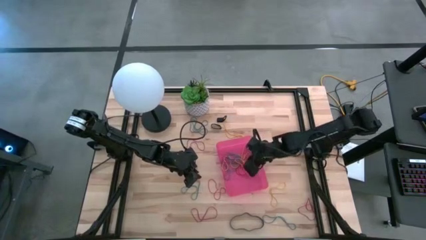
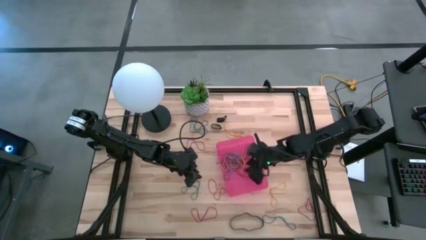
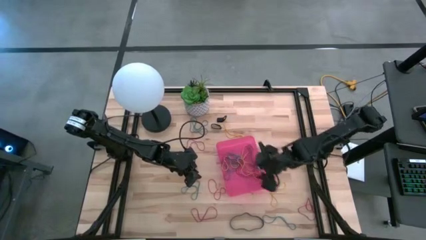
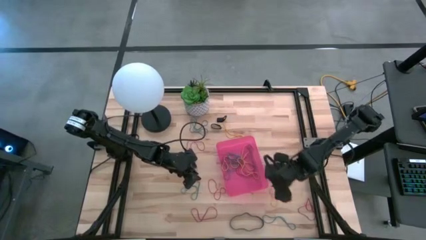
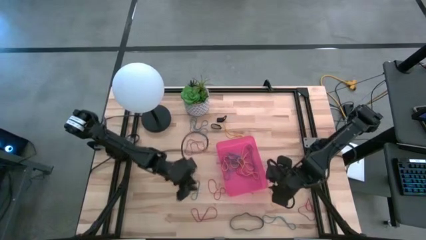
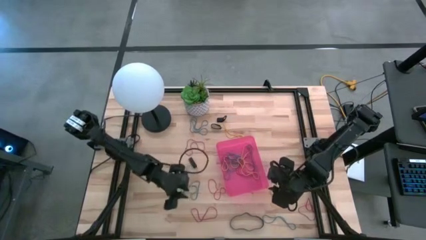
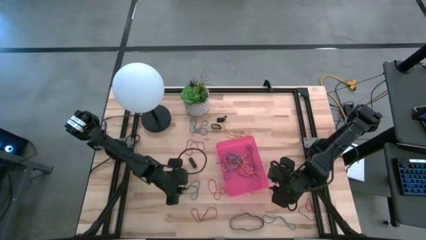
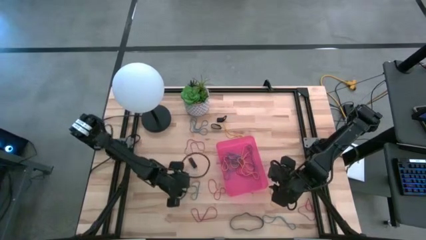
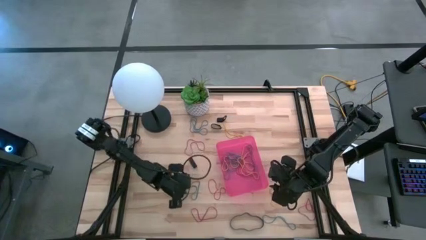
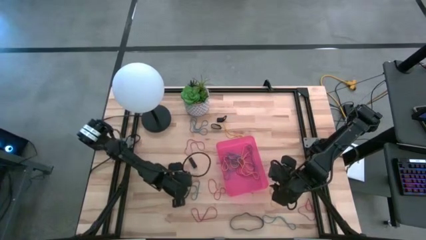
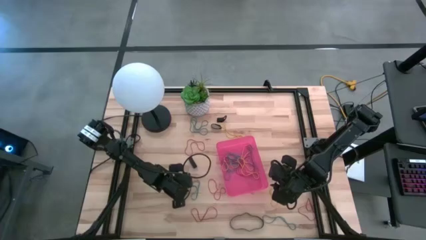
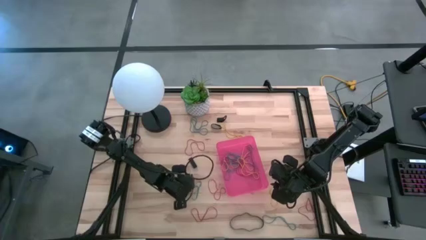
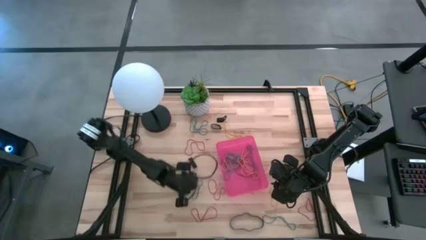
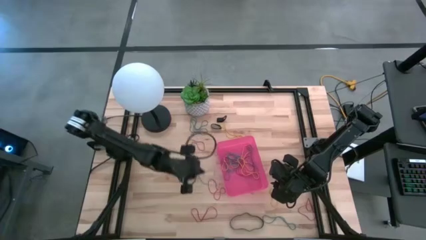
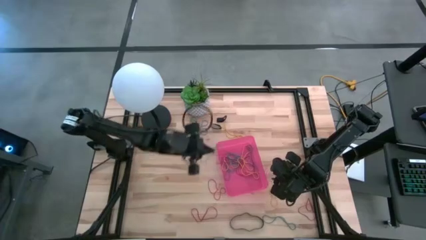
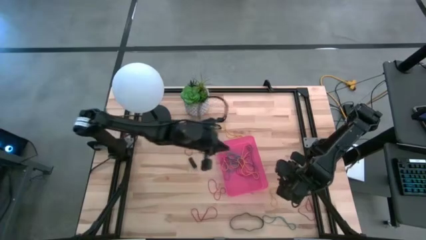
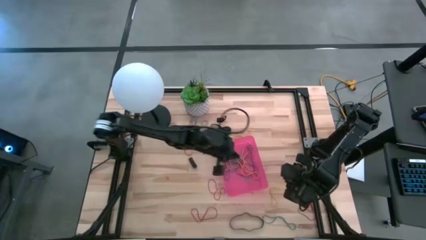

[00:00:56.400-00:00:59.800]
Task: Pick and place rubber bands into bin
Put the blue rubber band into the red bin

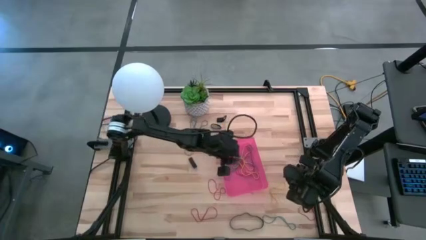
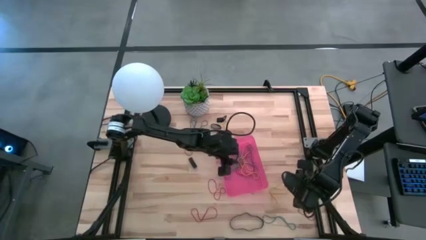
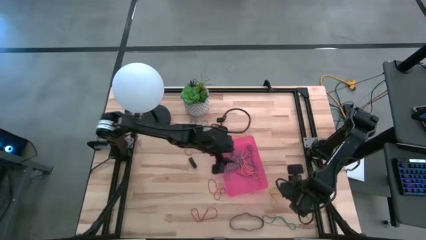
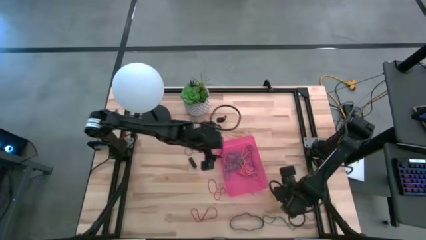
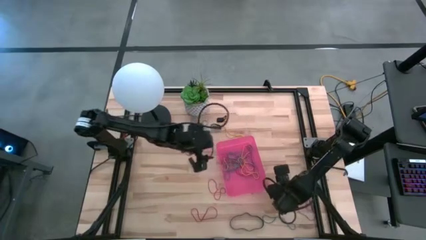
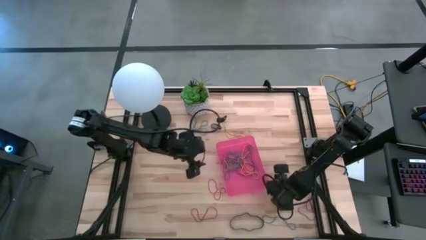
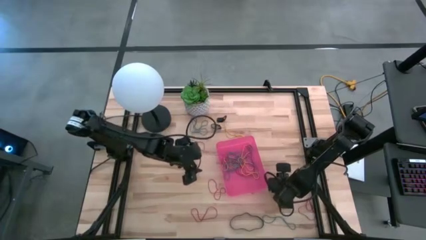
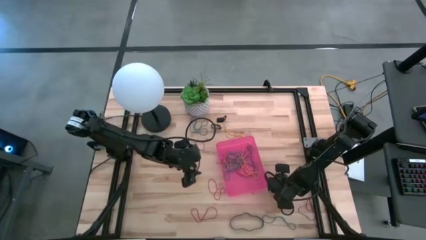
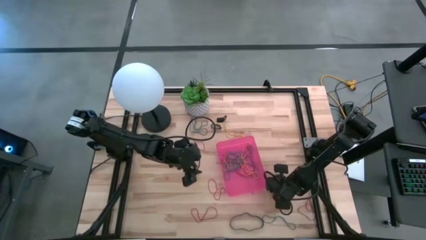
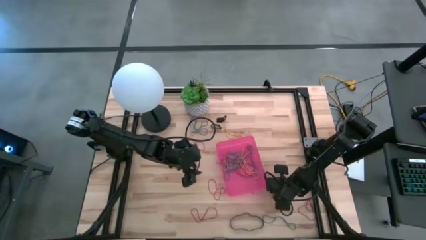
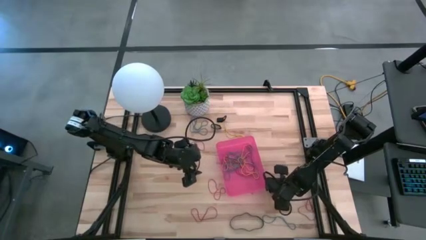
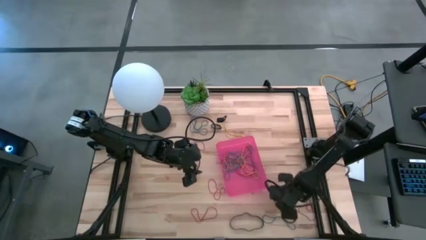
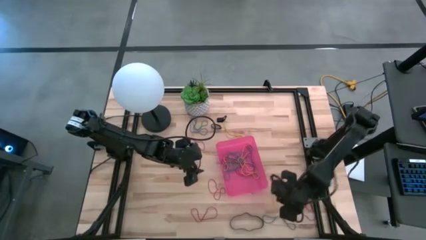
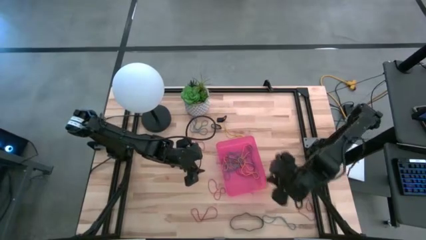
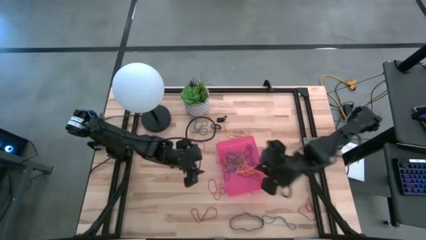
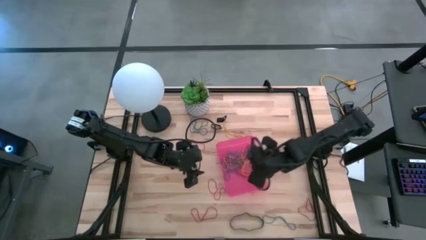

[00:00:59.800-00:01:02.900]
Put the bottom yellow rubber band into the red bin

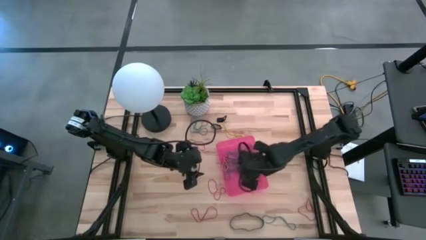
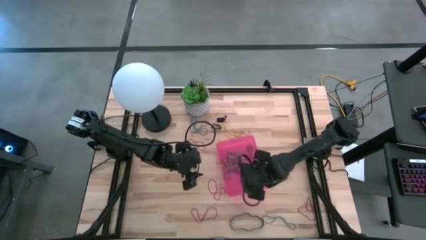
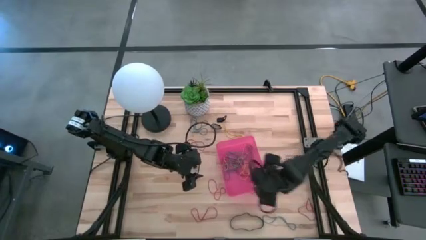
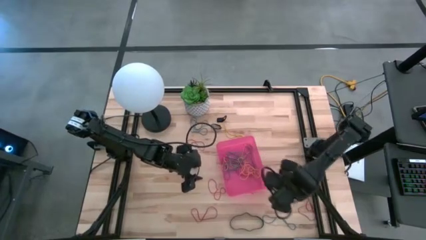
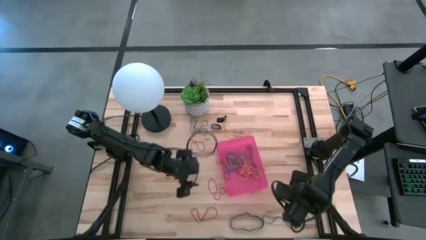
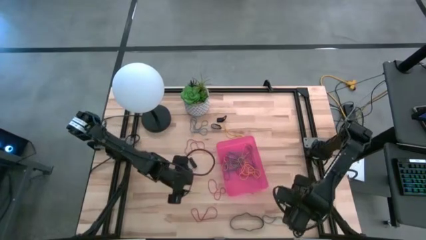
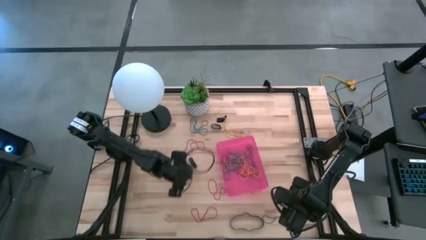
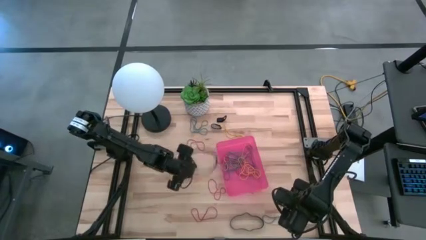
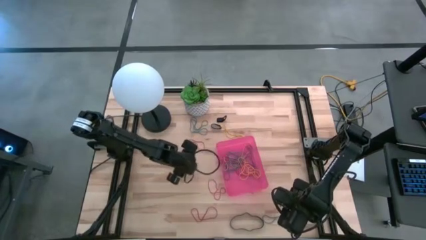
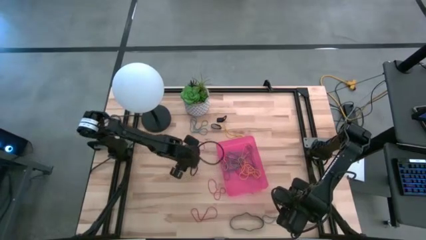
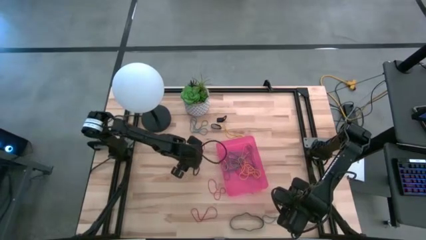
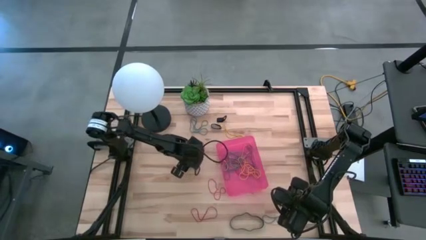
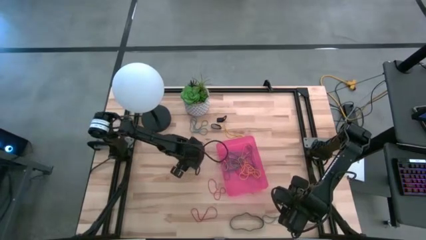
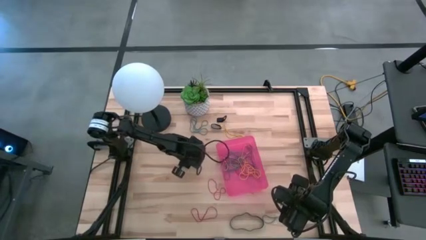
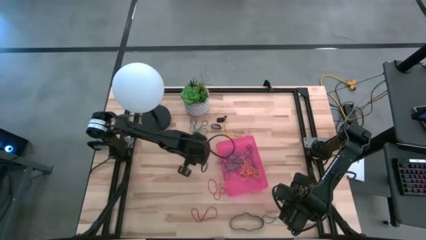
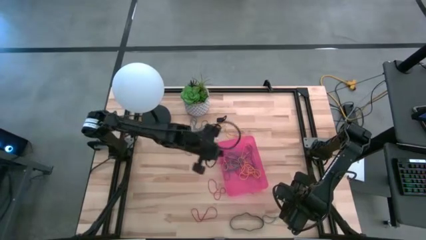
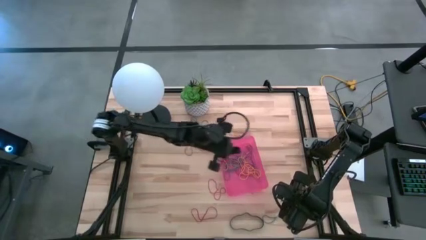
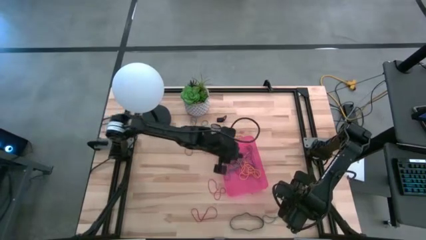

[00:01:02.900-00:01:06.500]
Put the black rubber band into the red bin

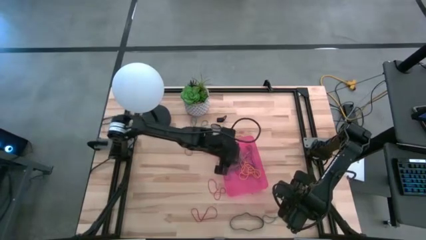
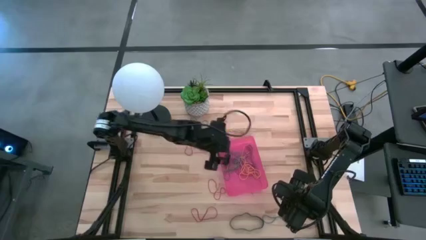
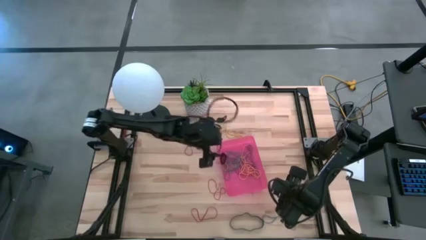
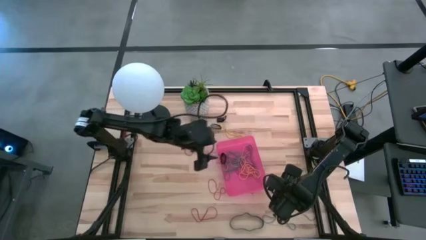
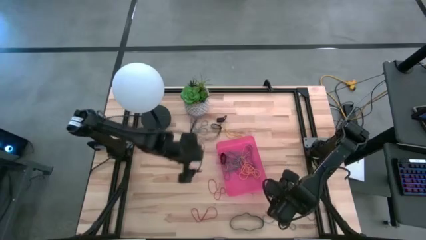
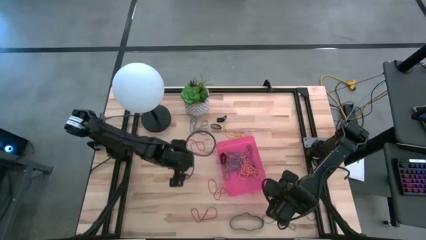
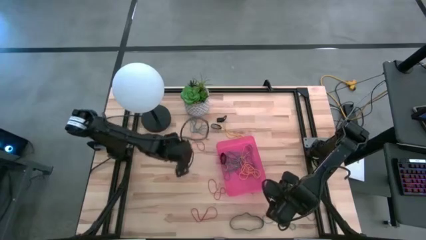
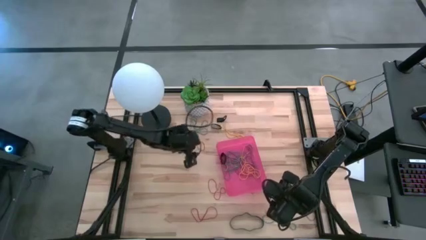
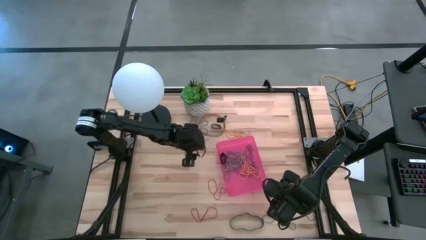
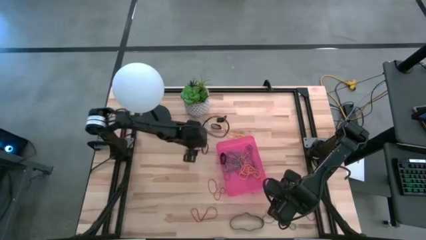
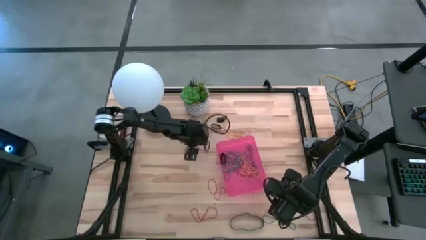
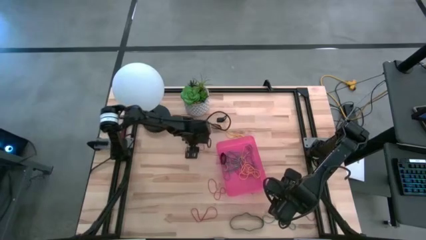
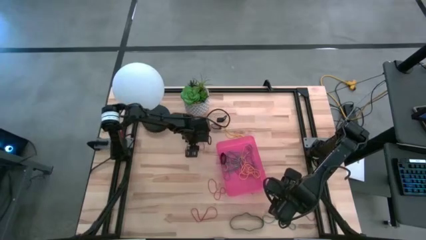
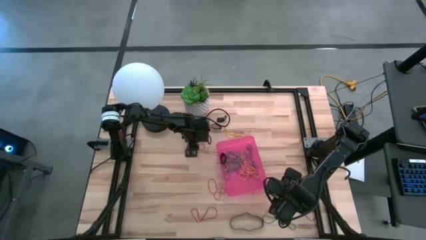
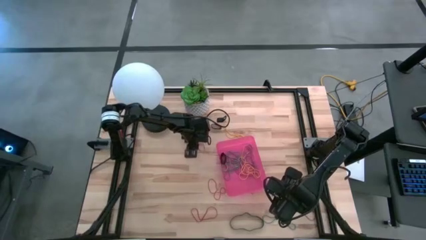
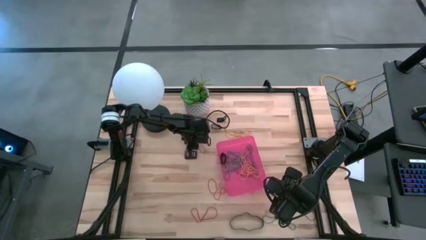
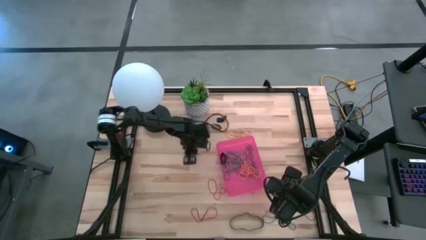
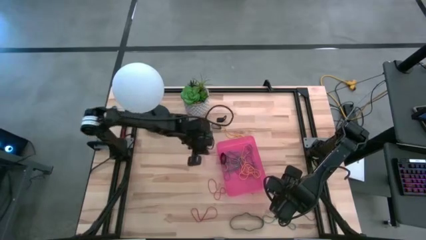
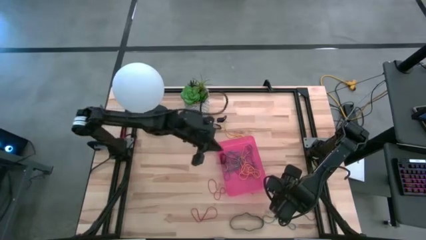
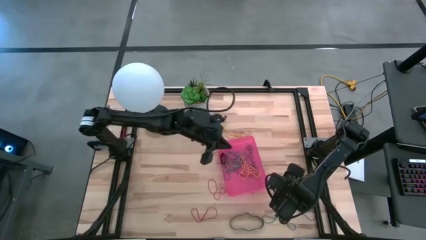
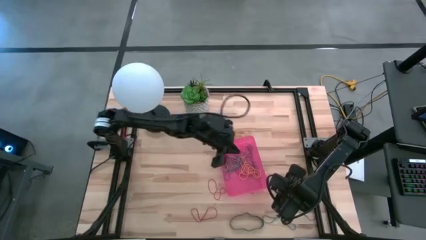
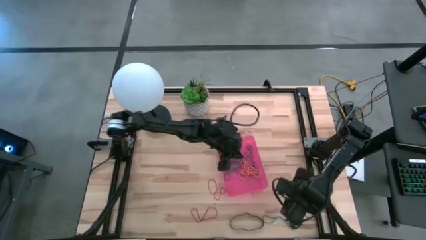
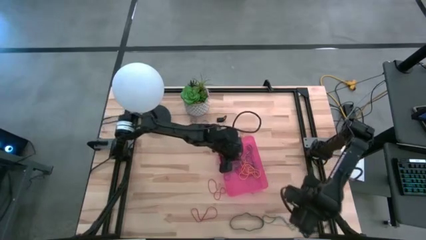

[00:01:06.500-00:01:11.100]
Put the red rubber band into the red bin

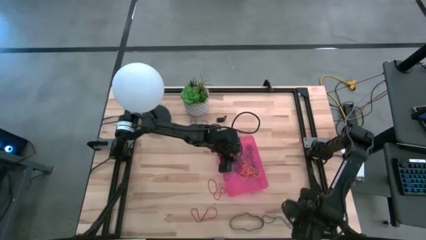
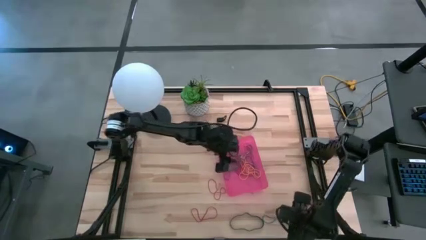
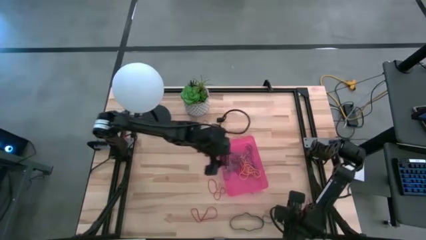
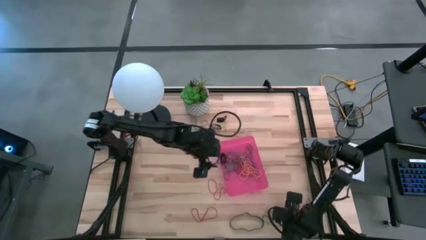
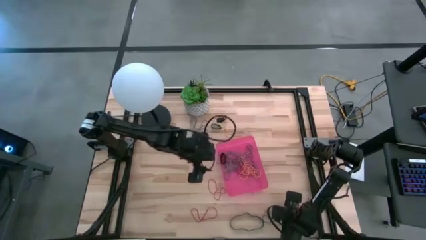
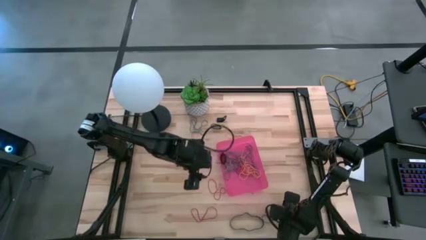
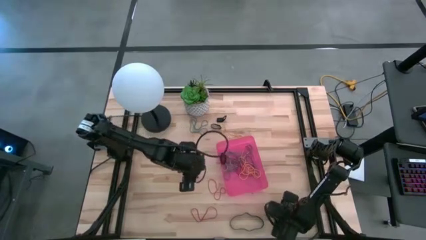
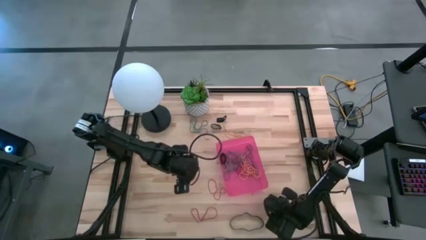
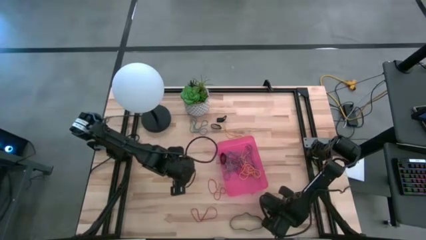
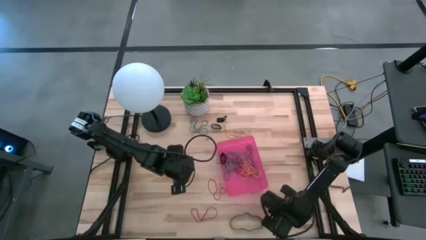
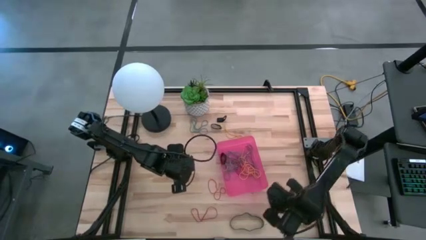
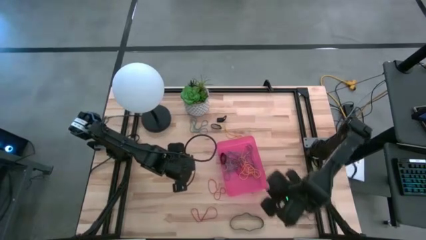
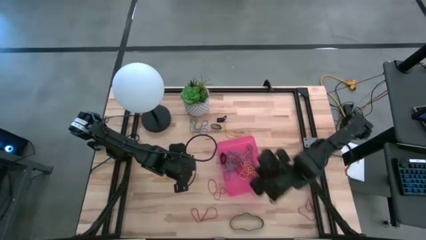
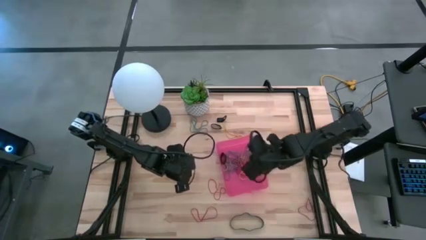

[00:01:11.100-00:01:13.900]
Put the bottom blue rubber band into the red bin
